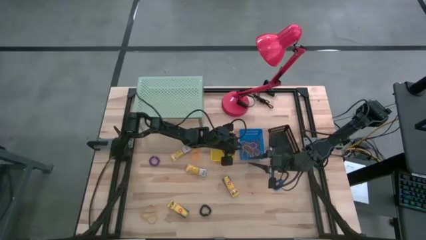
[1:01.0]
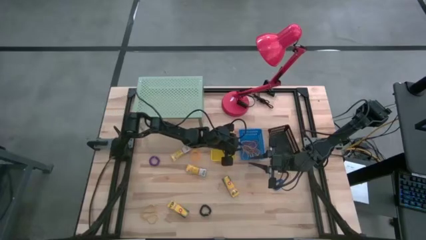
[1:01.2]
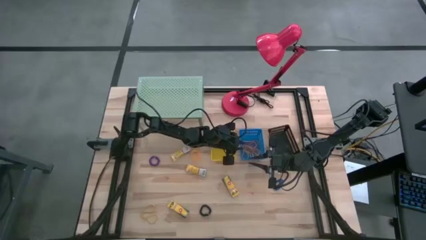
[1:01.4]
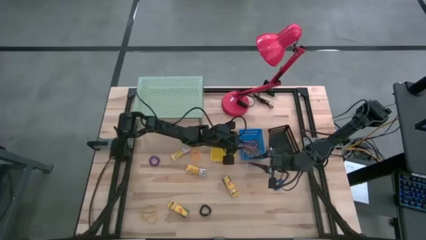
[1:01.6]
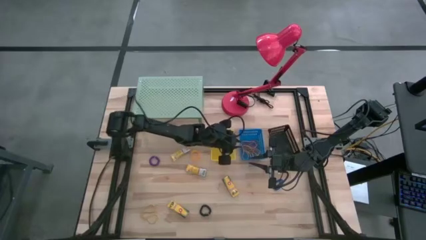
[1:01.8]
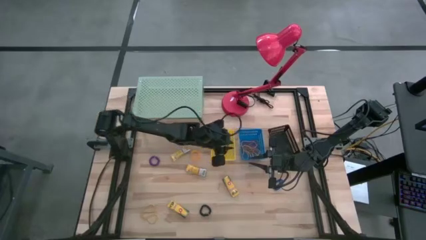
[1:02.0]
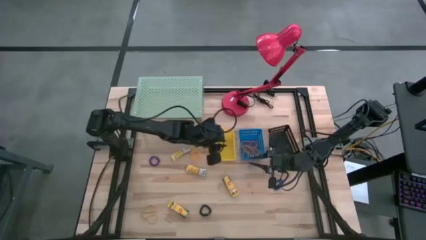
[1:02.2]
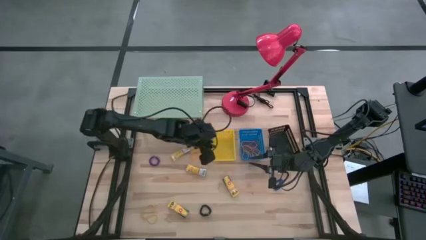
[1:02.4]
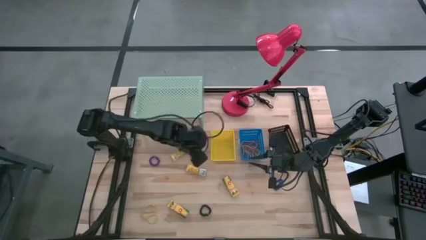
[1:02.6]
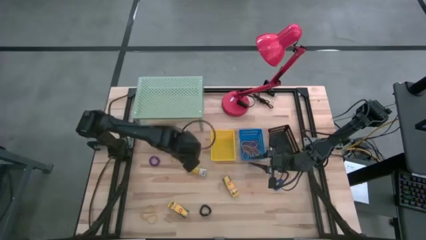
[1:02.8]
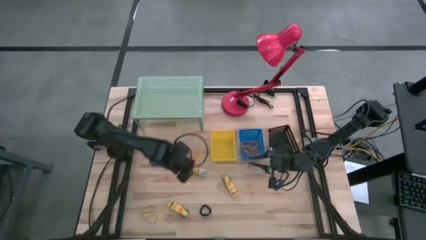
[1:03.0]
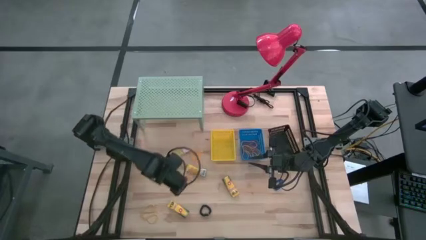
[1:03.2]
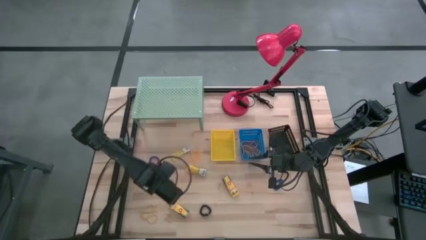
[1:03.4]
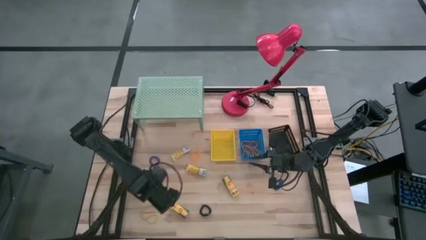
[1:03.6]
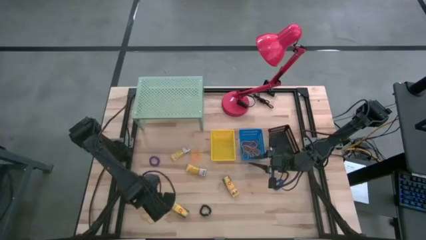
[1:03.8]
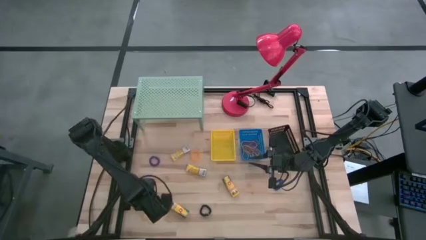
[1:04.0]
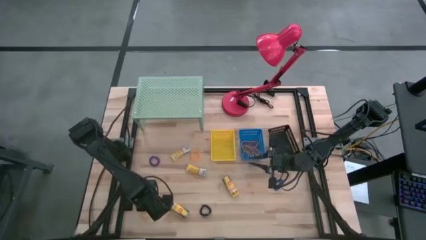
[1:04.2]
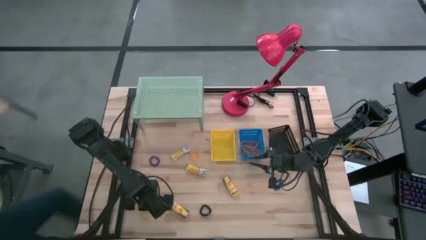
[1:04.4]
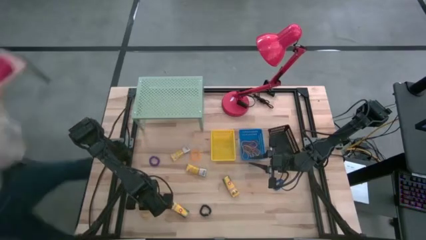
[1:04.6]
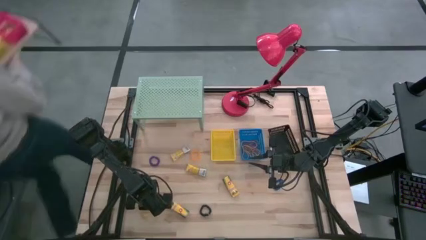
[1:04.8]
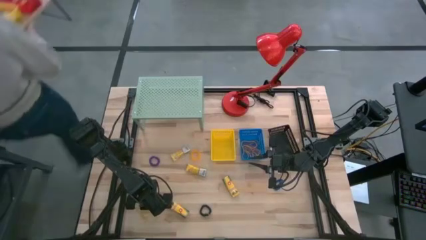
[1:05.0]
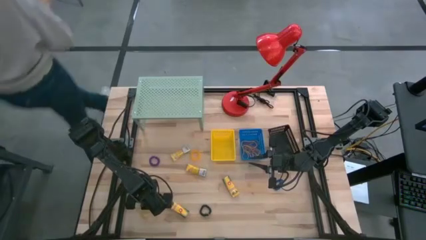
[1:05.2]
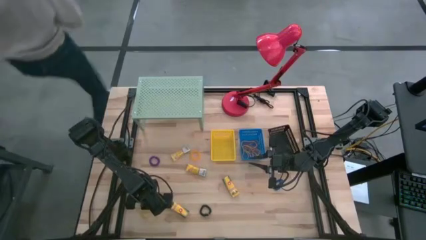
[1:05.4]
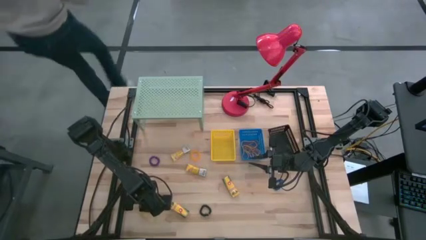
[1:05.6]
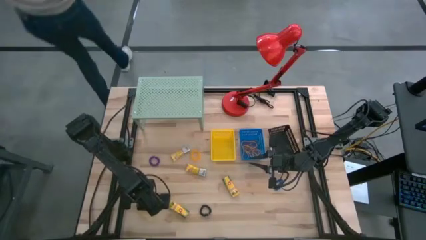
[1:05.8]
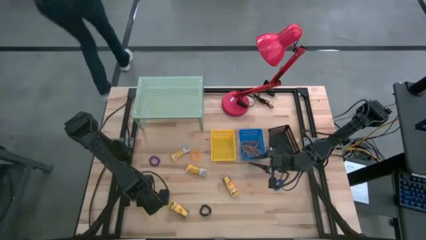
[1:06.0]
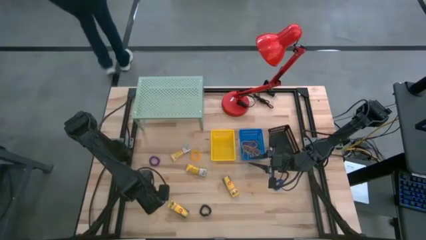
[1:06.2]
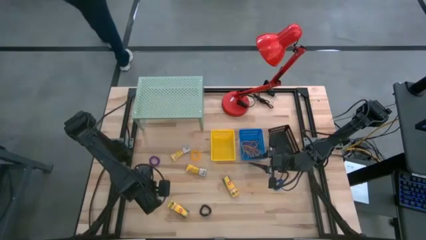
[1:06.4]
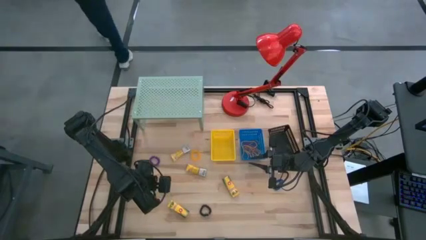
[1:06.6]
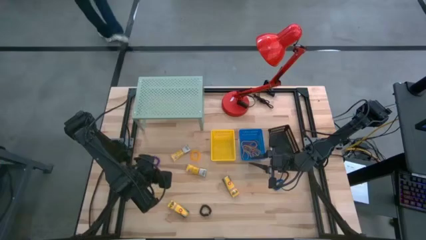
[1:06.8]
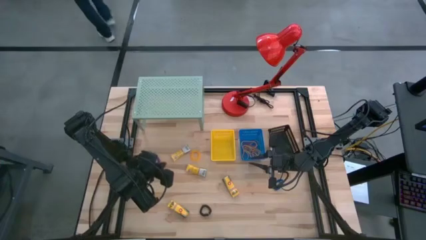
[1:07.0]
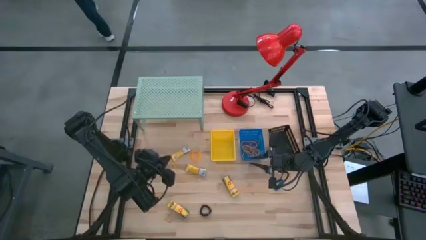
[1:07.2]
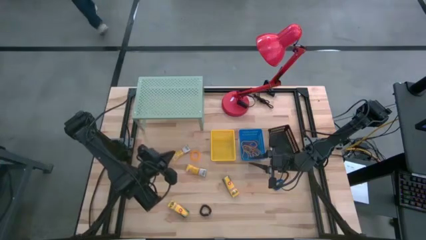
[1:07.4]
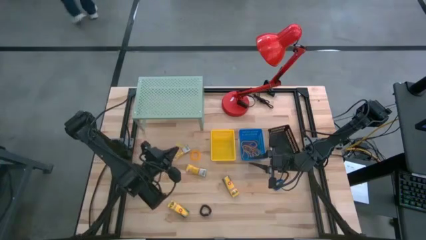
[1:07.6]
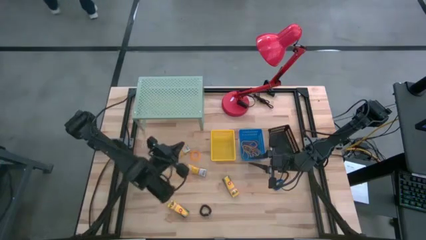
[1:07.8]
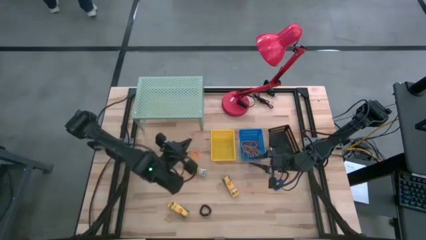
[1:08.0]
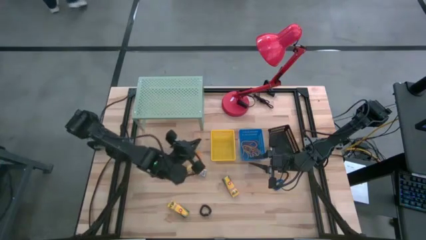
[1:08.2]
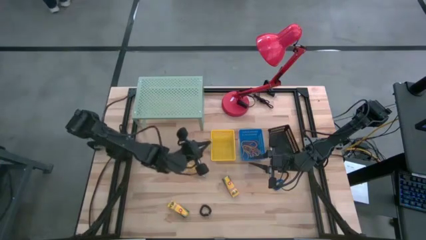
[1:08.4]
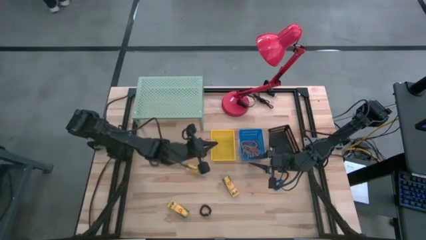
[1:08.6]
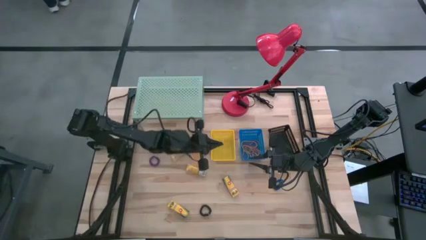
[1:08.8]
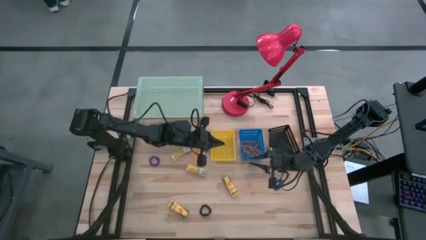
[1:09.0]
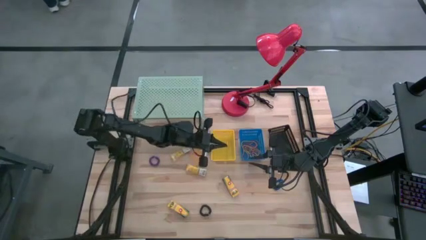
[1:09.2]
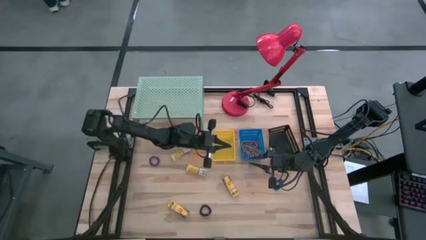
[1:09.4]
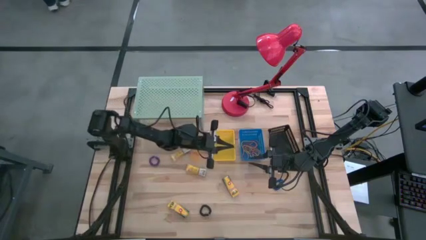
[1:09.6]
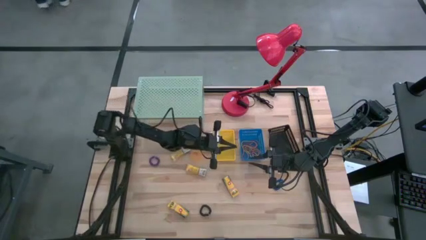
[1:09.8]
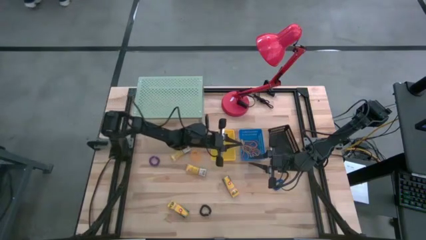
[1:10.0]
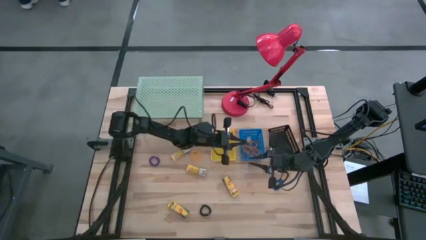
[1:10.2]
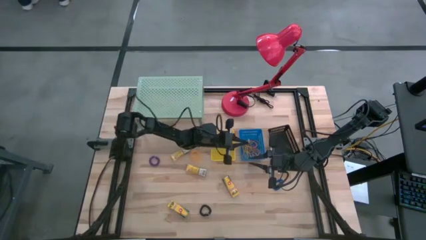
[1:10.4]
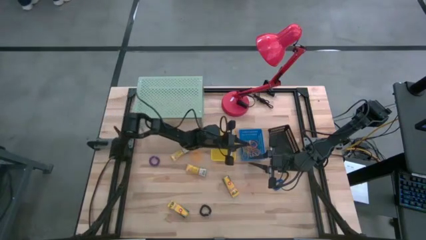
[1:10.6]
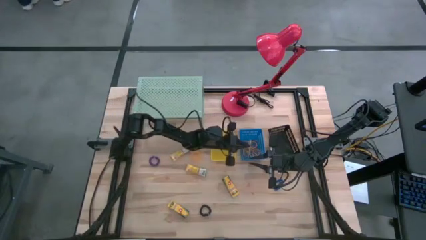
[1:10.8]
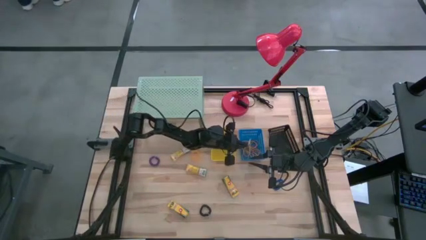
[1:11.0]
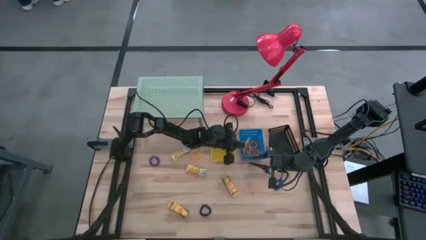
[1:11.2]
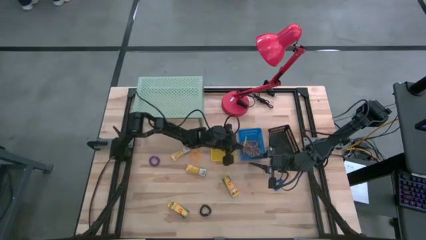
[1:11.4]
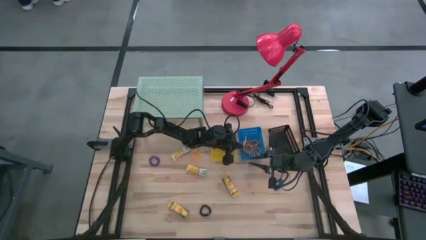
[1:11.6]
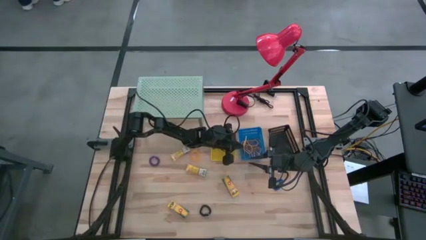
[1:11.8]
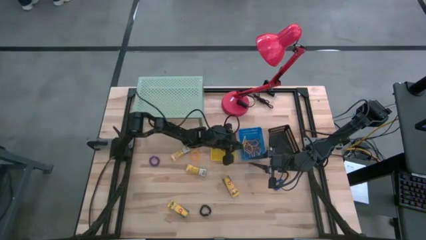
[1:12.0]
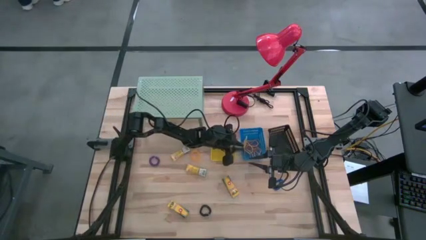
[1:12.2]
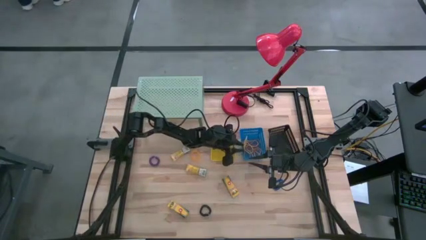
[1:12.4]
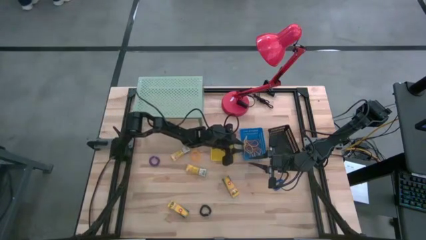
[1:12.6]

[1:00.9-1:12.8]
Task: Pick & Place Office Desk Supplies
Put the yellow rubber band into the blue basket

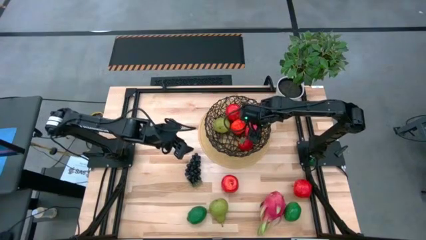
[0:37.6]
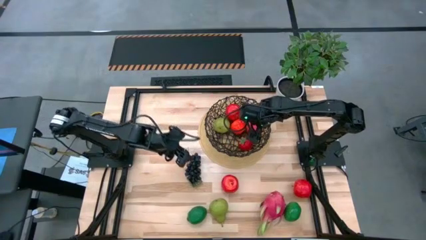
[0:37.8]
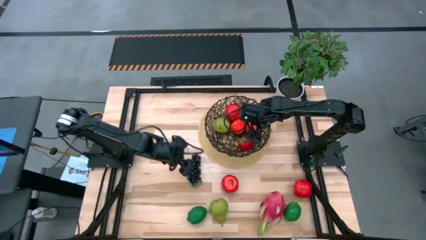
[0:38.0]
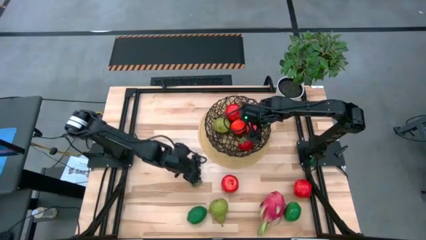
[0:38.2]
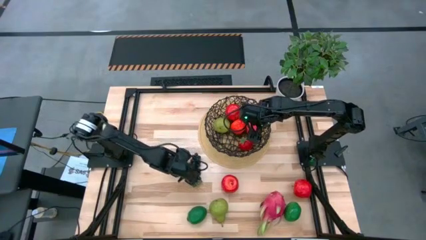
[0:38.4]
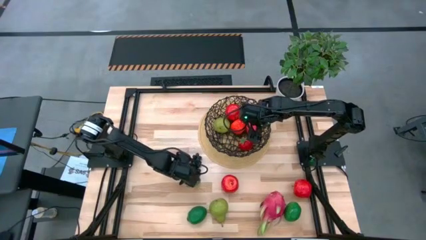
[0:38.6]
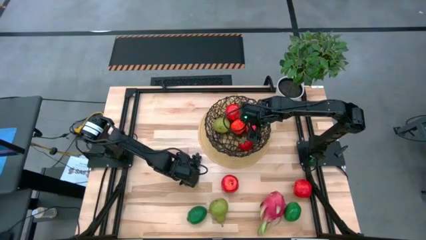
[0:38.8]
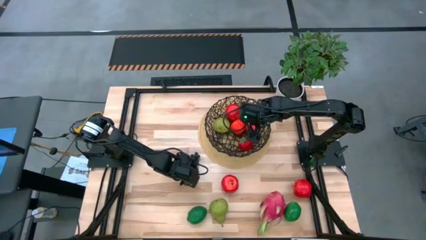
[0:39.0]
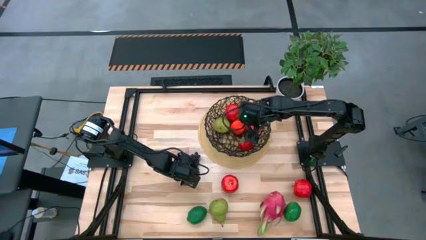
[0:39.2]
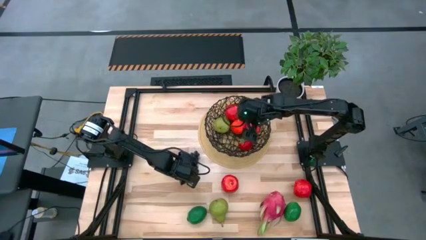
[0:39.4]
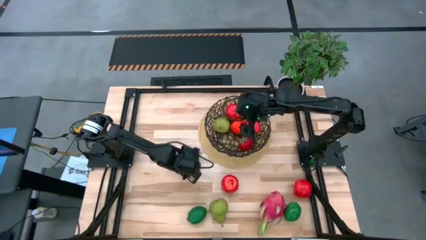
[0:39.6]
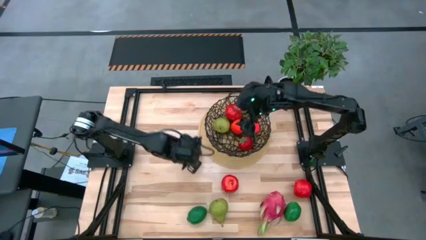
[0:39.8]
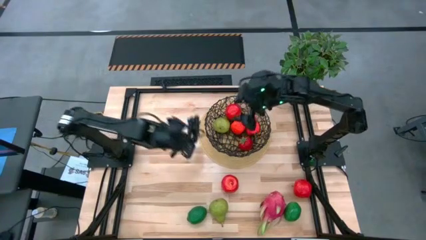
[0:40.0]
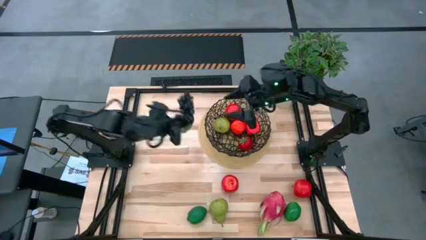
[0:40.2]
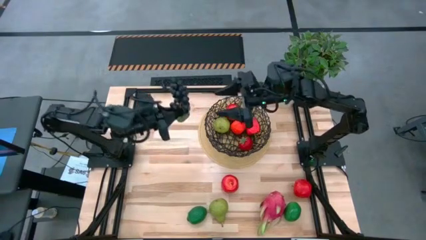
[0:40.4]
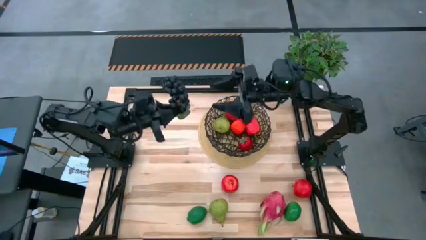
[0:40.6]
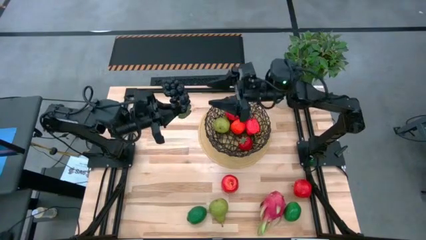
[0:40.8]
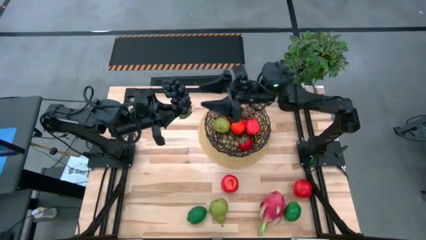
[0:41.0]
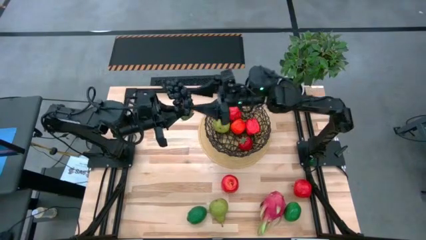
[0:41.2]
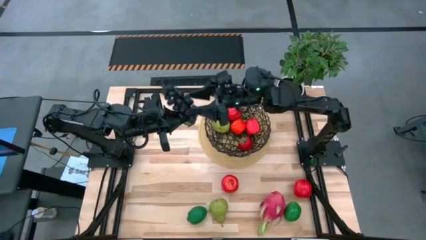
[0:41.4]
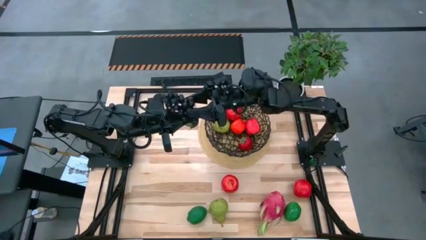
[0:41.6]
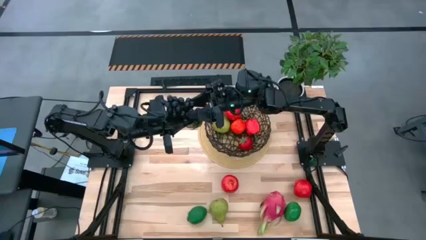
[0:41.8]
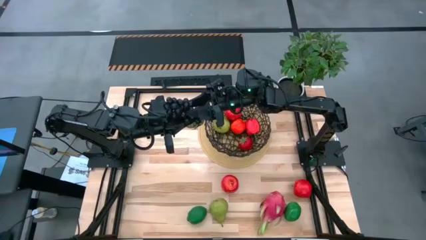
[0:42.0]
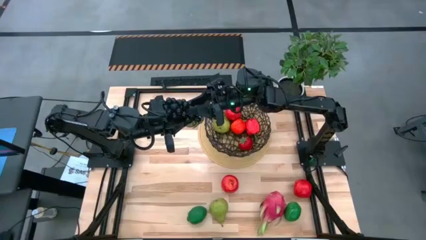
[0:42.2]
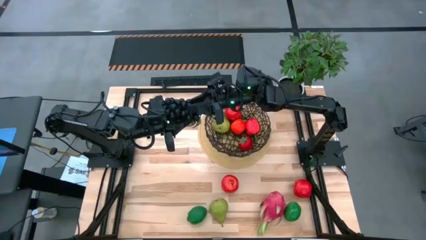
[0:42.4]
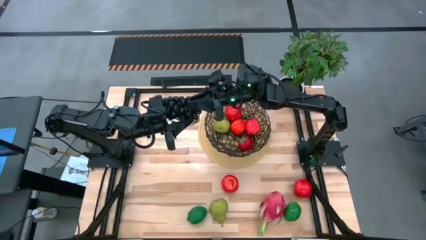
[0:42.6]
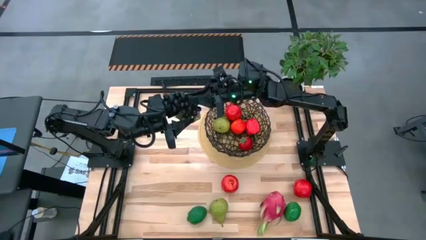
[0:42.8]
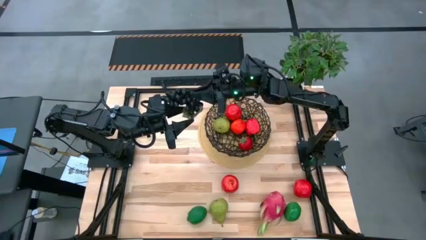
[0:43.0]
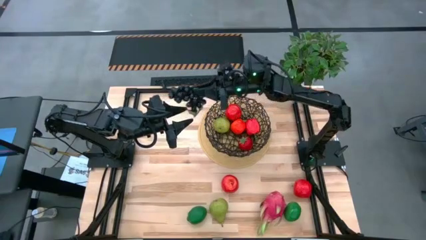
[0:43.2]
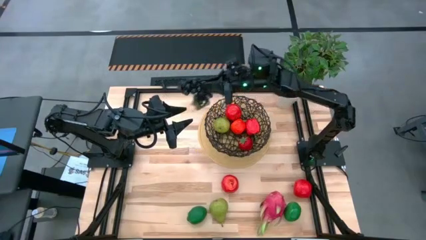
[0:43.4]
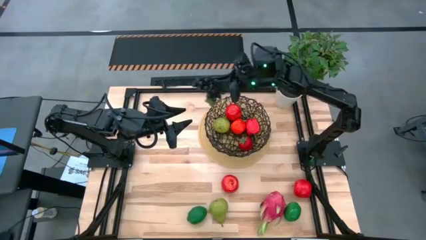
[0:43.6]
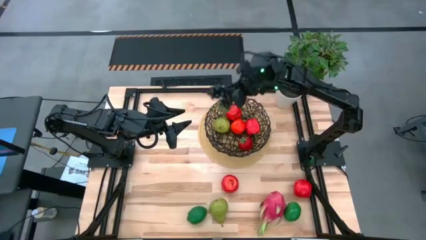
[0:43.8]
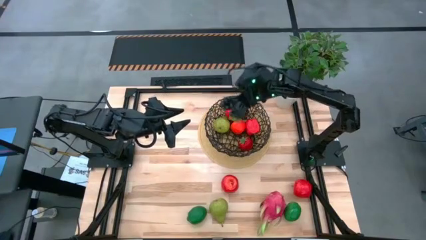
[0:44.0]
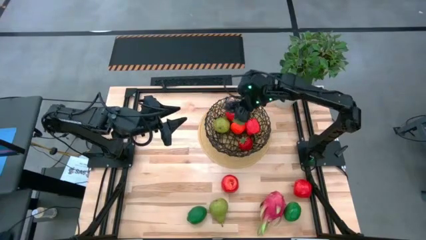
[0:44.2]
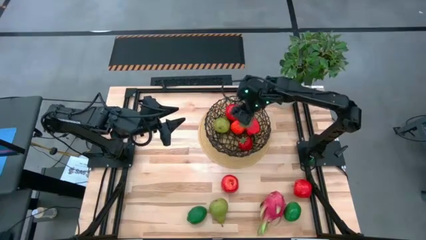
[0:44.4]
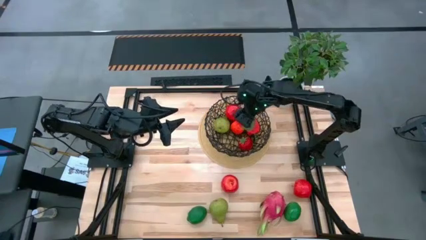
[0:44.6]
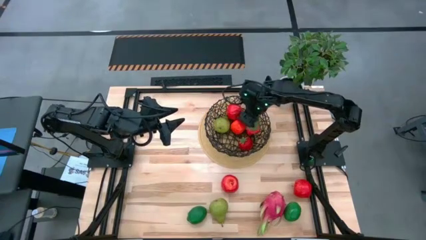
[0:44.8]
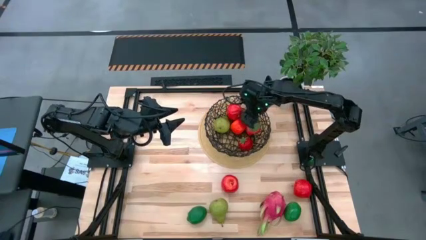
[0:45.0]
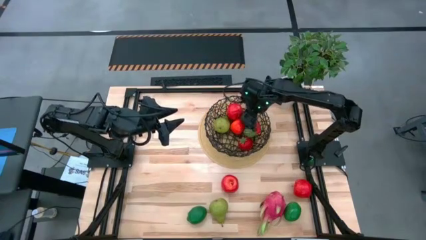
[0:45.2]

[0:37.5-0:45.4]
Task: Build produce basket
Put the violet grapes into the black basket
